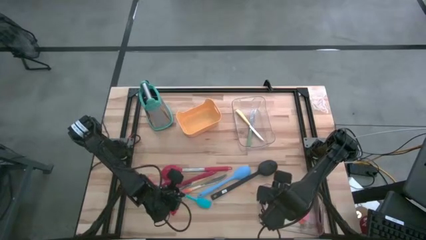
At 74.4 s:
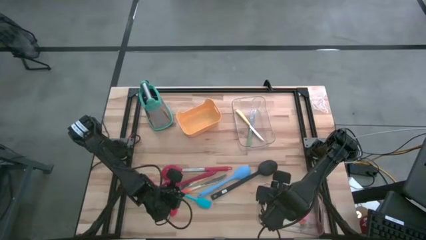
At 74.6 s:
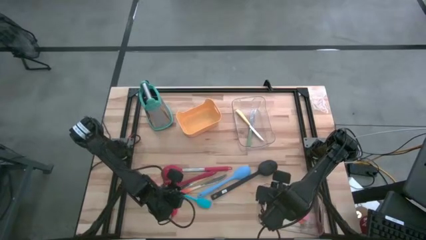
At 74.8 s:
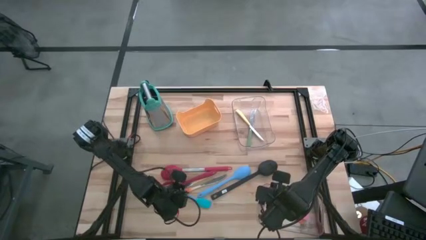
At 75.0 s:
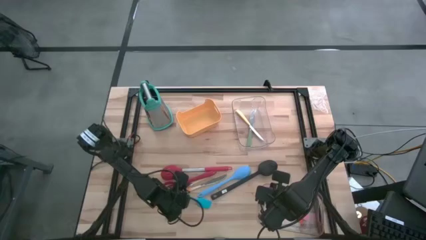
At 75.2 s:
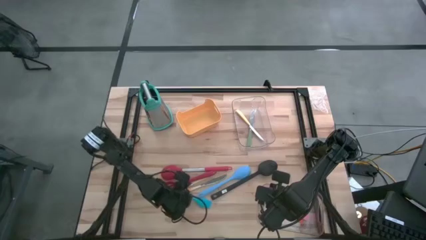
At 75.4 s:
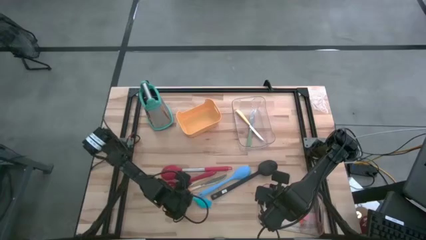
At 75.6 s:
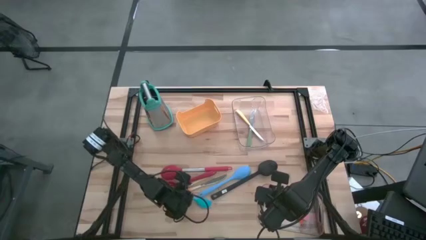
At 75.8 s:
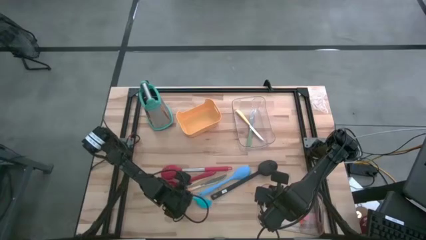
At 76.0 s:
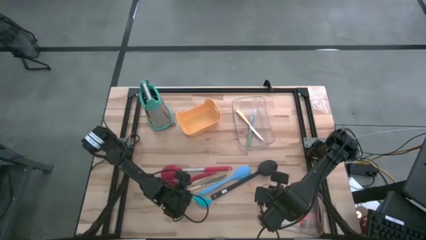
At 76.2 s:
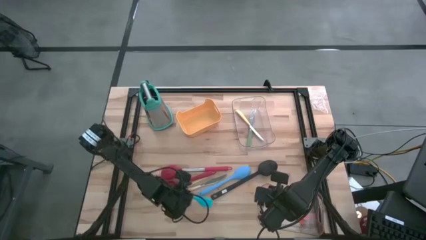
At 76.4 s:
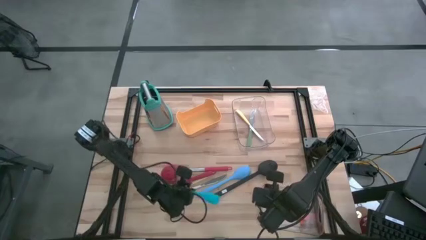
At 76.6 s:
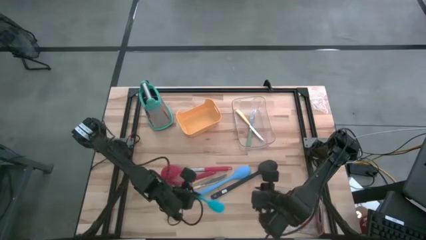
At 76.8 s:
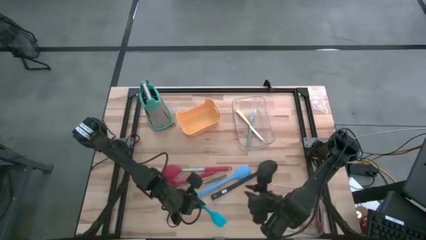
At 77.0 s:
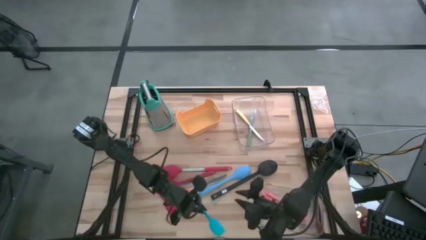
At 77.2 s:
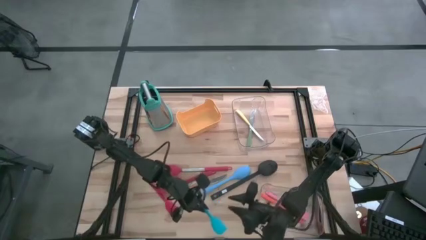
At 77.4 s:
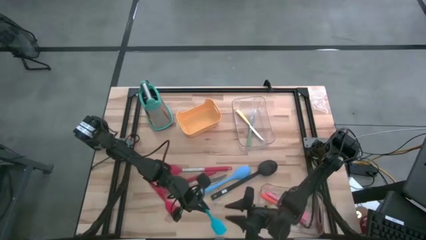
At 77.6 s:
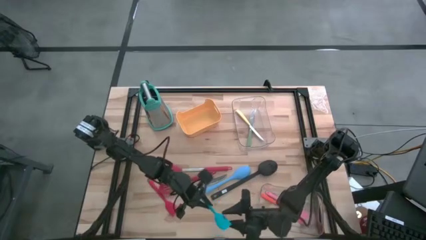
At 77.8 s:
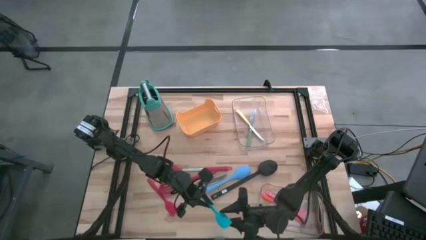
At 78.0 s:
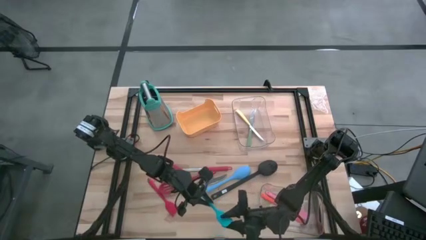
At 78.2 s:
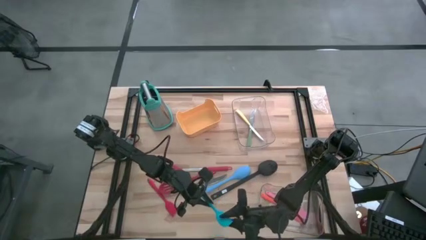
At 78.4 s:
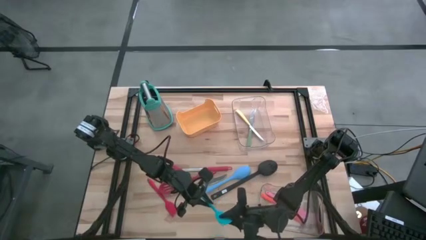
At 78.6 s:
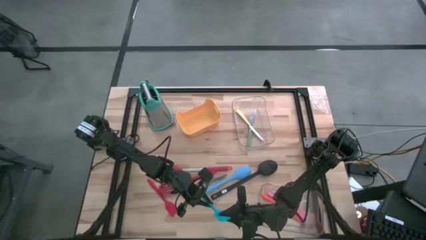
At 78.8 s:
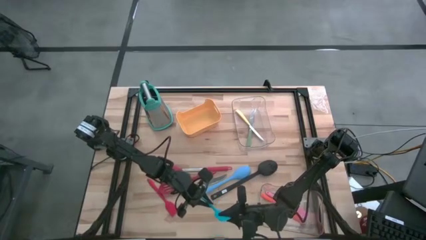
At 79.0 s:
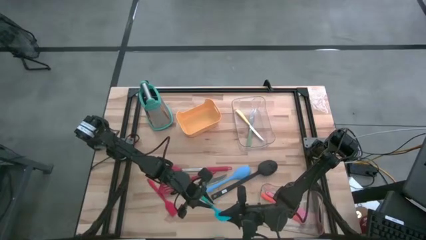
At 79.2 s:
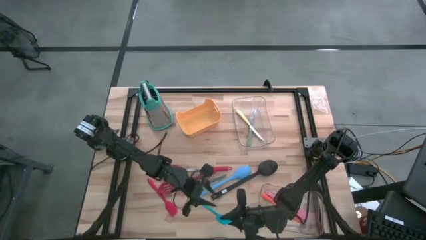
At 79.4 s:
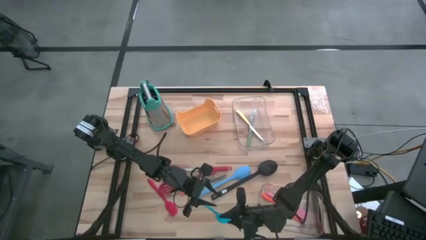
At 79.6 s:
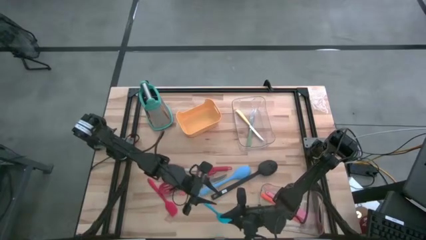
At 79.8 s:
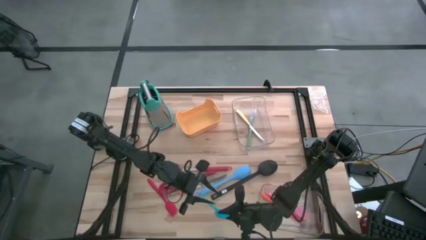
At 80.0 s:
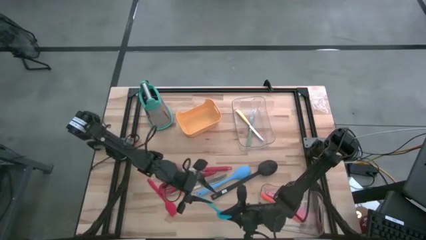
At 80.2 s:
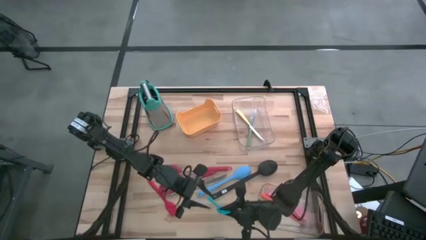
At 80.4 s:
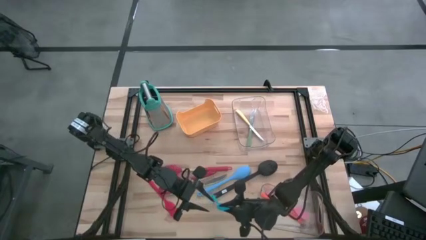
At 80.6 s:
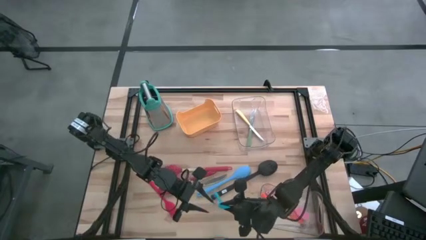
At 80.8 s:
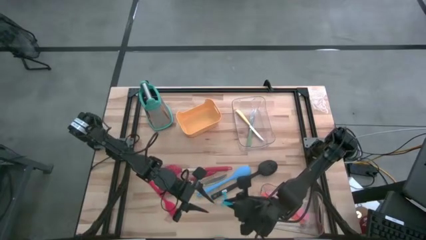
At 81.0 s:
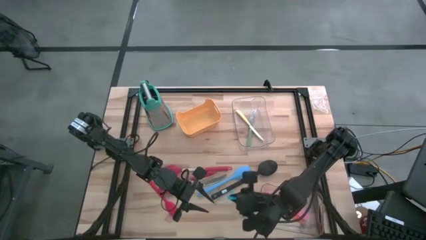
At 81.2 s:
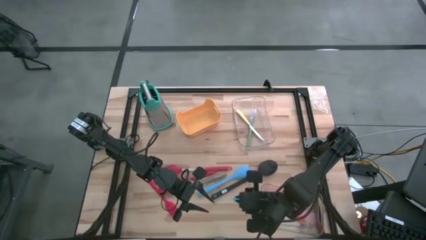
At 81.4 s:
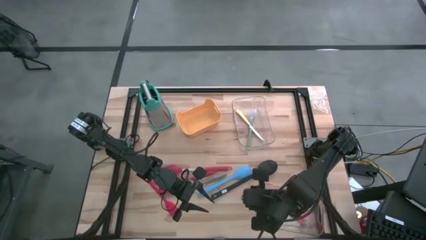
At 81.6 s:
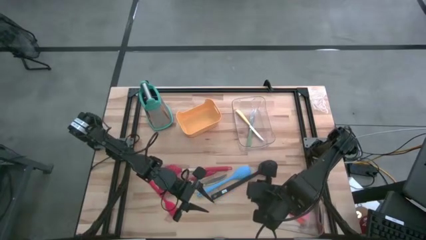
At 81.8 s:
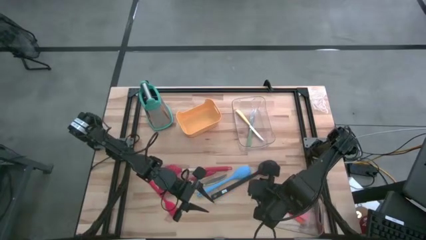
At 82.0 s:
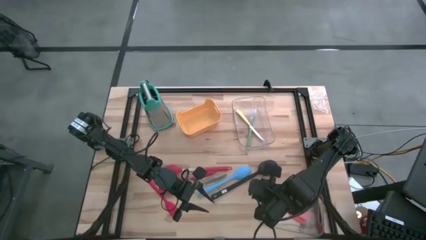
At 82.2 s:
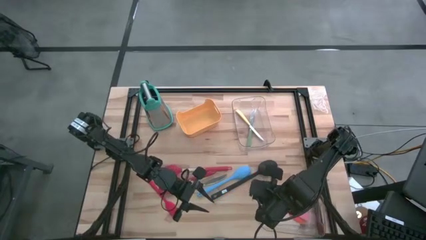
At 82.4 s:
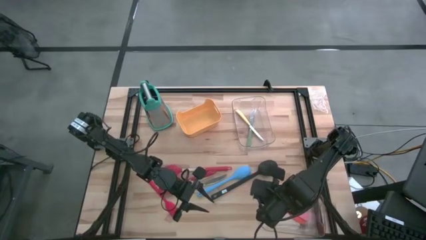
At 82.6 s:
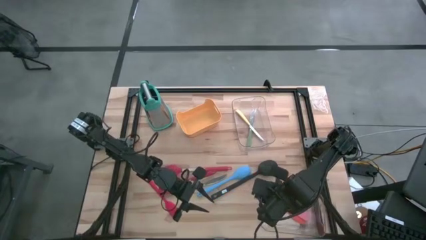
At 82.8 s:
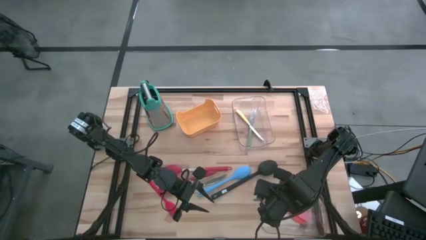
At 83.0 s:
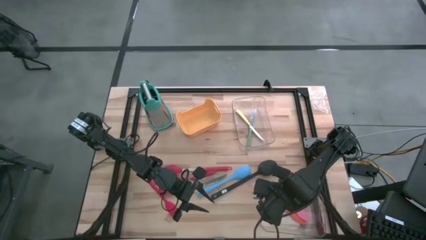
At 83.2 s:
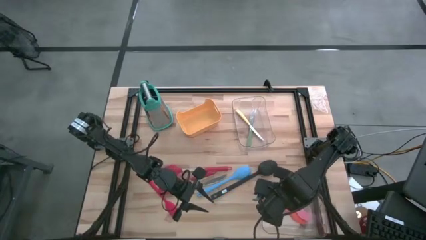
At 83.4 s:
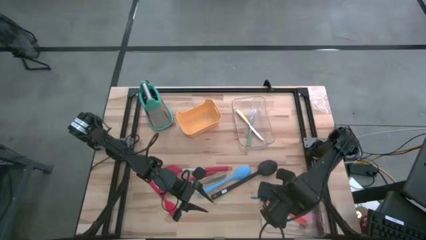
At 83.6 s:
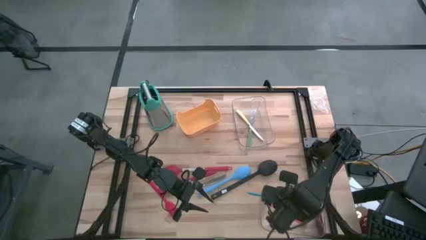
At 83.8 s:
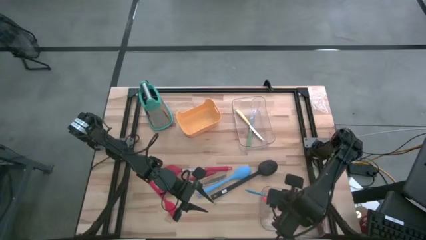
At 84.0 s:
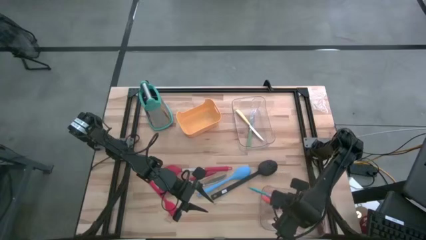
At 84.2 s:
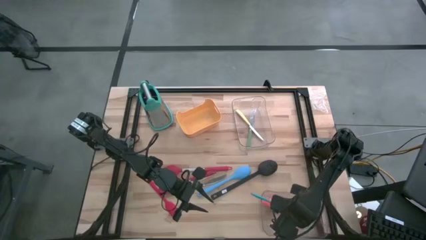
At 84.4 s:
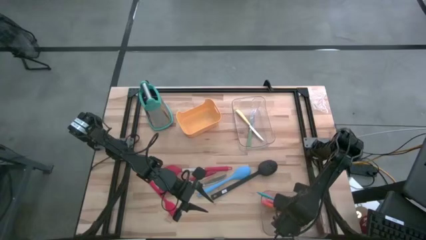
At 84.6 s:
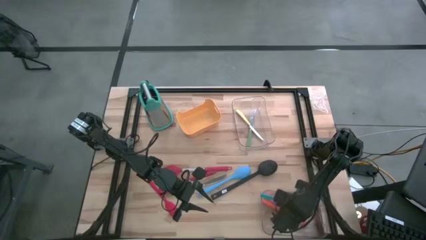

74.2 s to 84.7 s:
Task: Pick & Place Kitchen Items
Put the sky blue spatula into the bottom transparent bin

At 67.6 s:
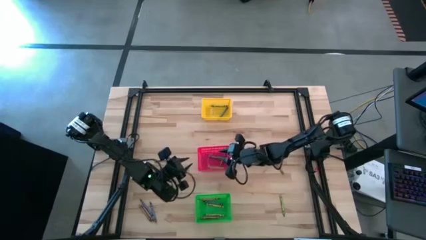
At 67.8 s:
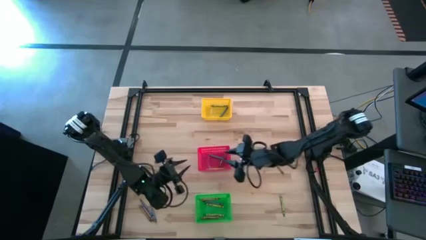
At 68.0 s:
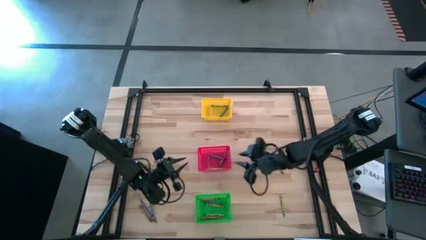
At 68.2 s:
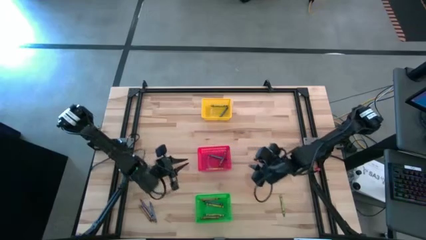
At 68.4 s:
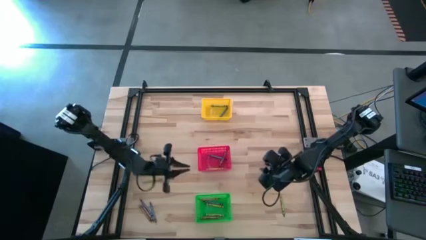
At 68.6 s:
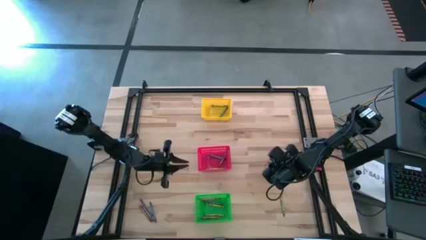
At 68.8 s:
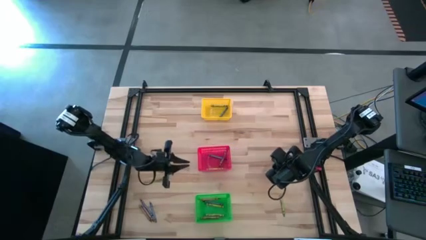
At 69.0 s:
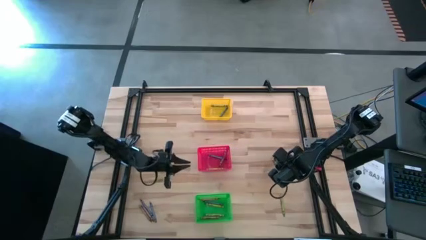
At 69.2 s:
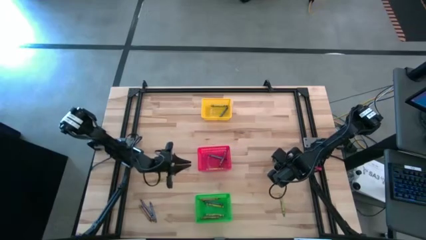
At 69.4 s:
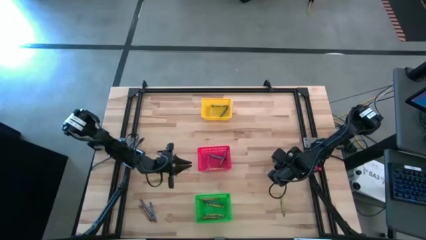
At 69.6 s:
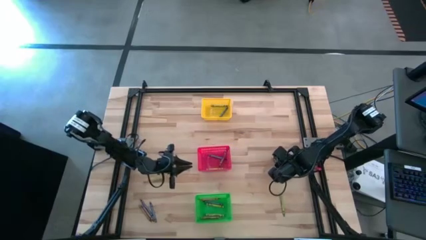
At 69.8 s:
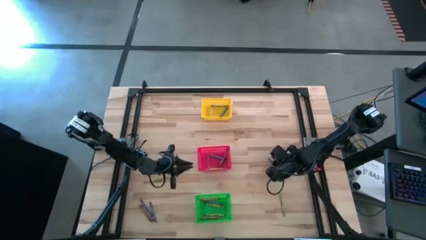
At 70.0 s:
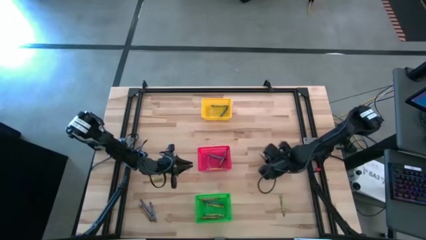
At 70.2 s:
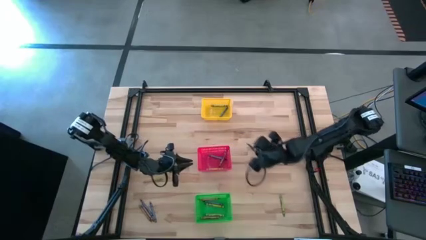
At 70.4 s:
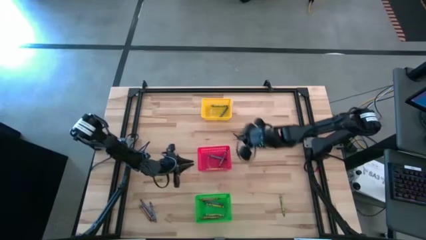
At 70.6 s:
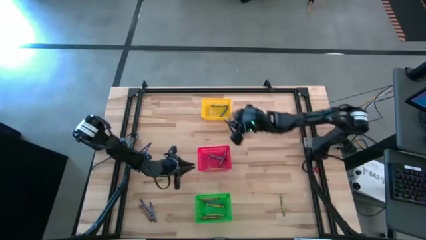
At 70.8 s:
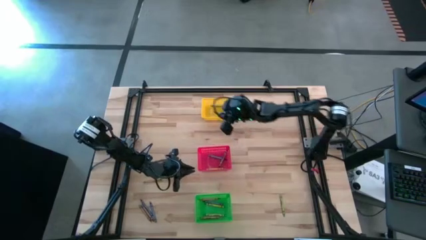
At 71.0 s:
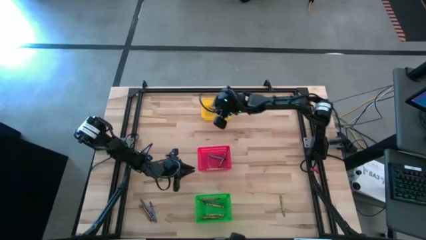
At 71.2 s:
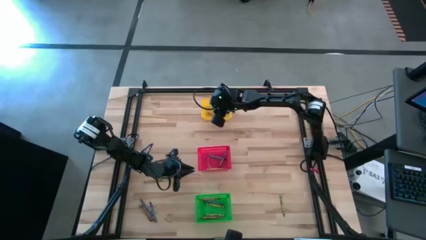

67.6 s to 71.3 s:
Task: Sort crayons
Put the brown crayon into the yellow bin

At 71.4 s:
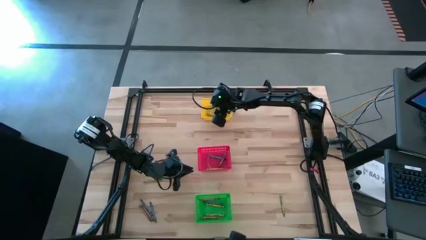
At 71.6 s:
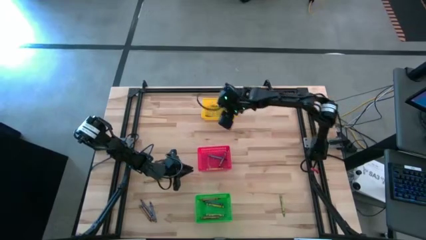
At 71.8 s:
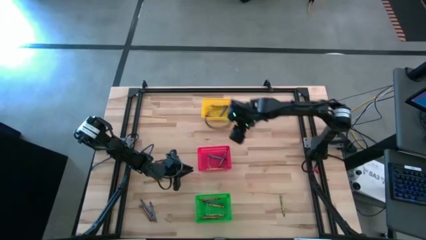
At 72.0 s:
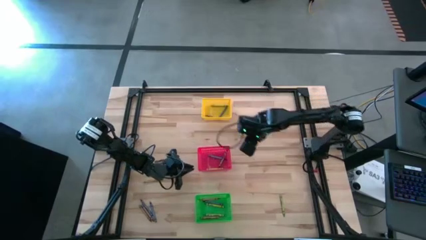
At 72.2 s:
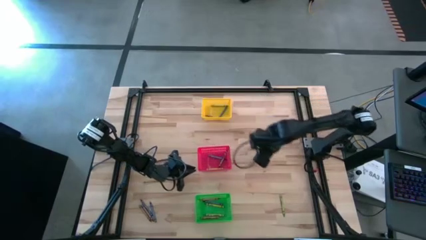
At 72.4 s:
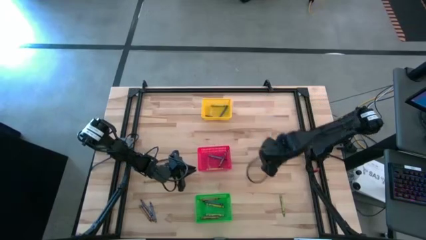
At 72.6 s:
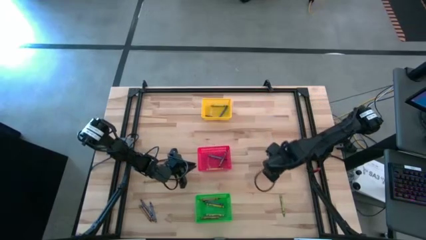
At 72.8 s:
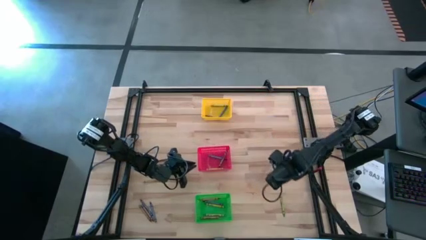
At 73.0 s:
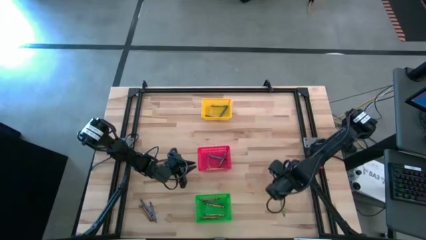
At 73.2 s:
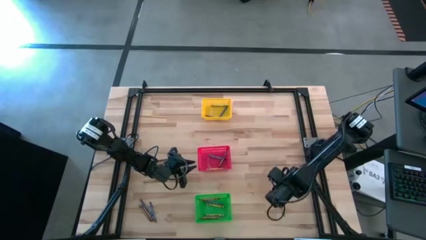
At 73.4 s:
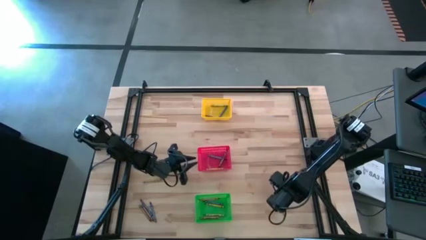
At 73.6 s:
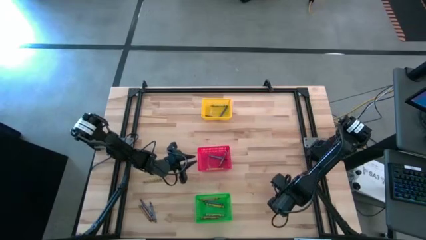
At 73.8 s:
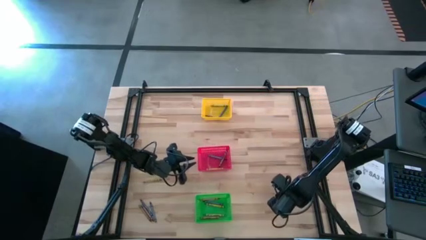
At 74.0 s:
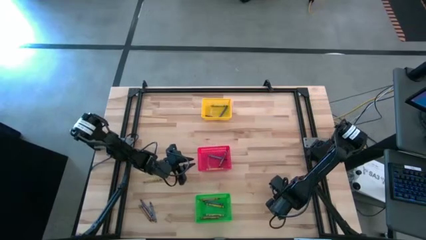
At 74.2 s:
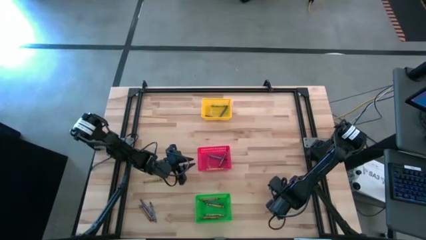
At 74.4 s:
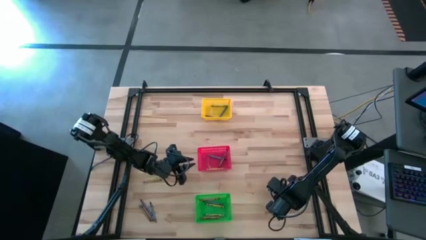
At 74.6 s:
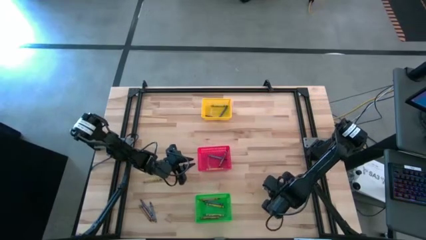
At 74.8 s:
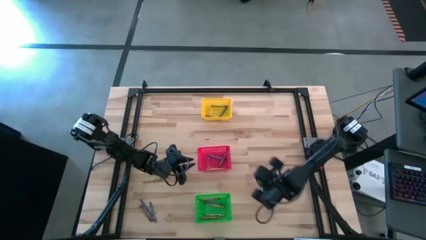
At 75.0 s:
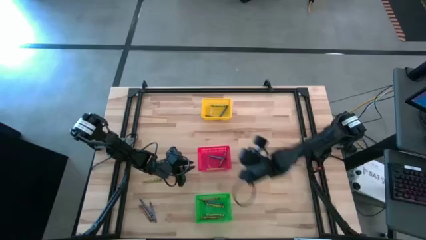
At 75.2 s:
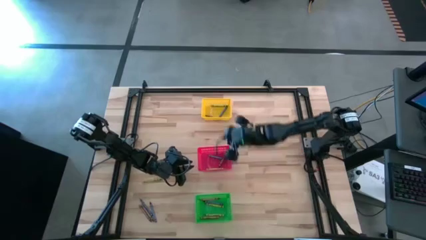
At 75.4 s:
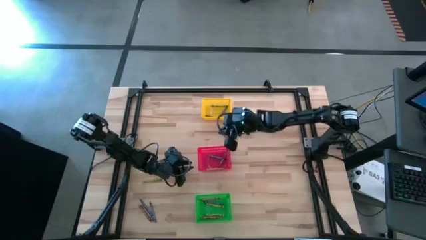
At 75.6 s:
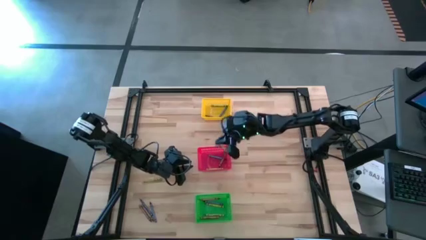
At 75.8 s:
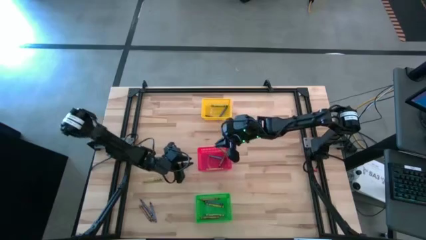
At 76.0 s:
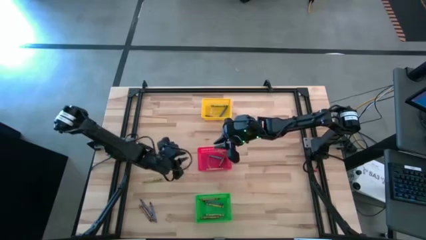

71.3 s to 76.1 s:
Put the green crayon into the red bin
